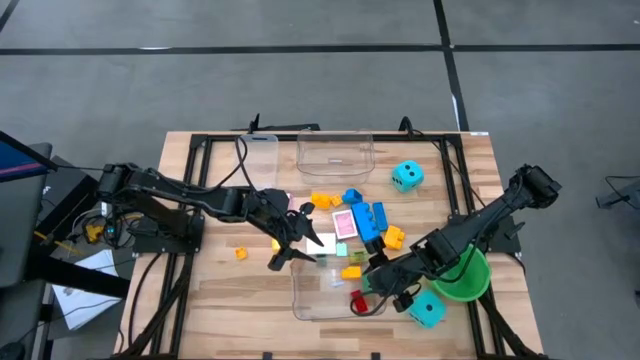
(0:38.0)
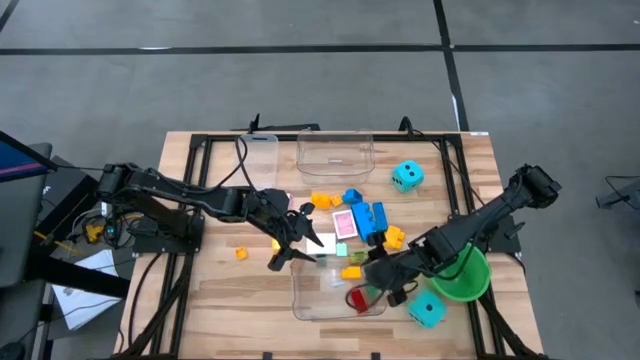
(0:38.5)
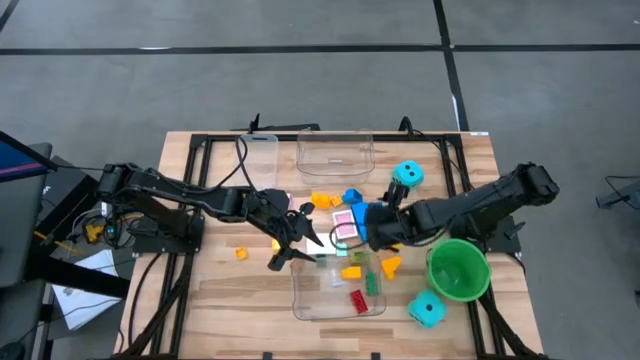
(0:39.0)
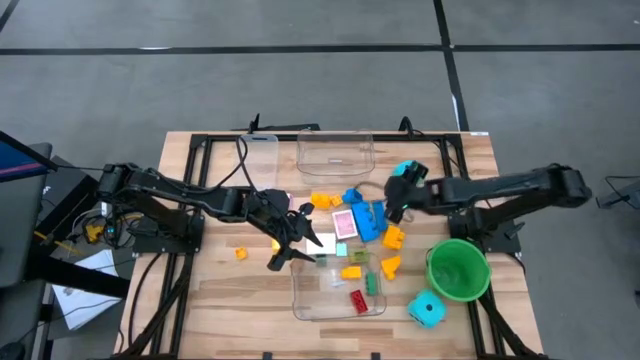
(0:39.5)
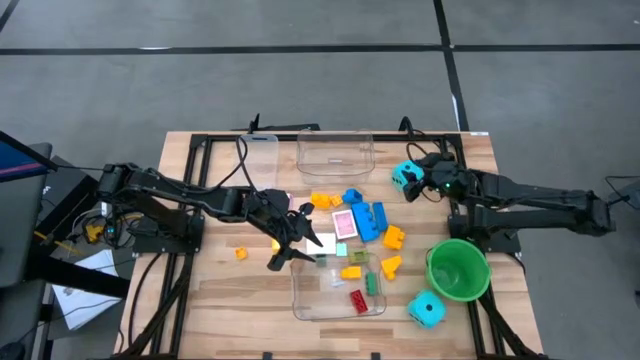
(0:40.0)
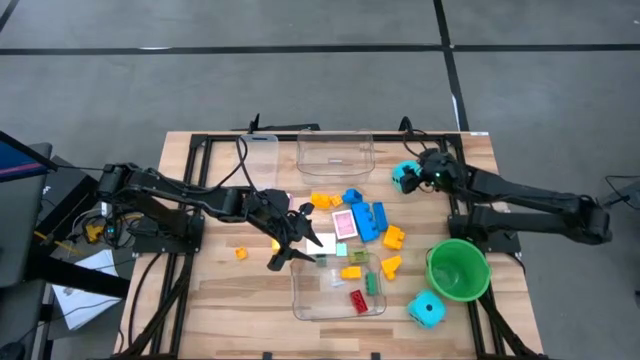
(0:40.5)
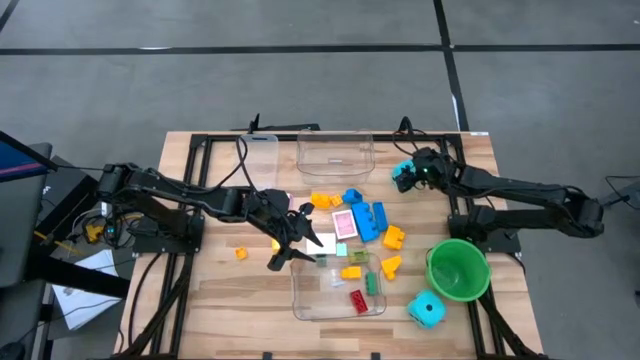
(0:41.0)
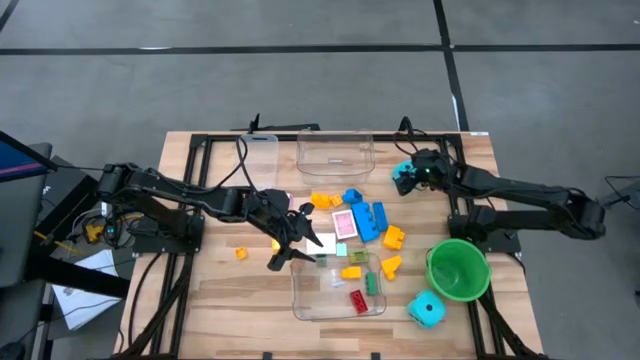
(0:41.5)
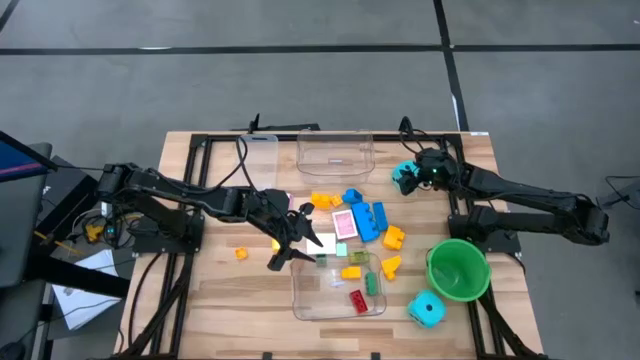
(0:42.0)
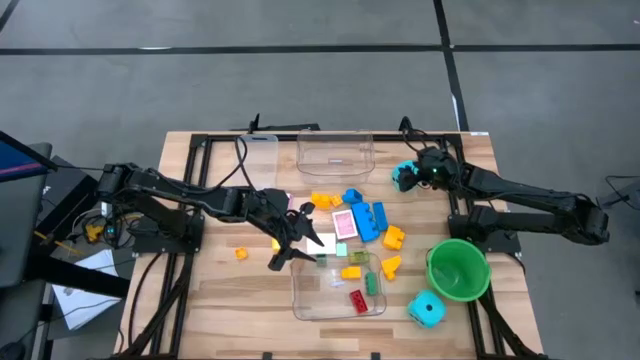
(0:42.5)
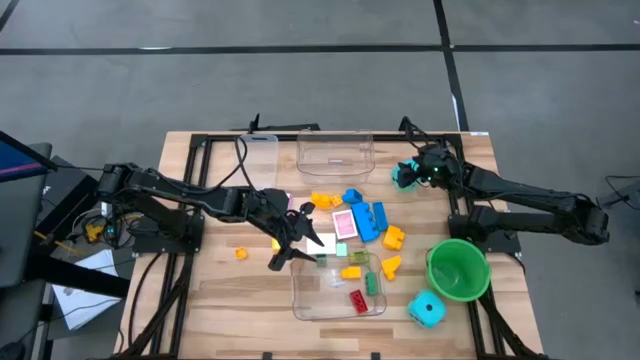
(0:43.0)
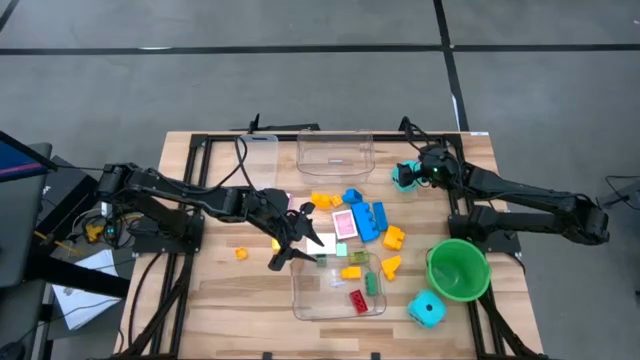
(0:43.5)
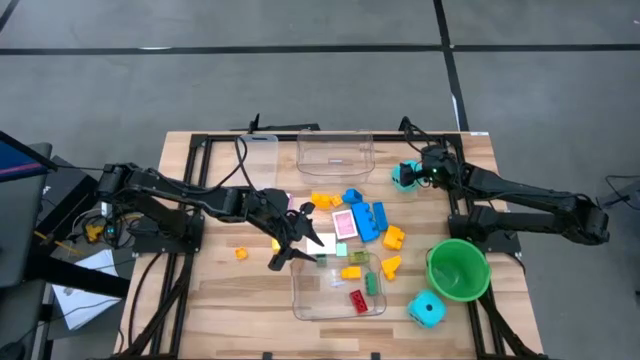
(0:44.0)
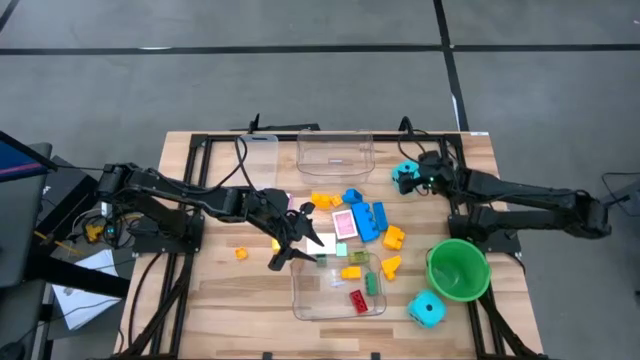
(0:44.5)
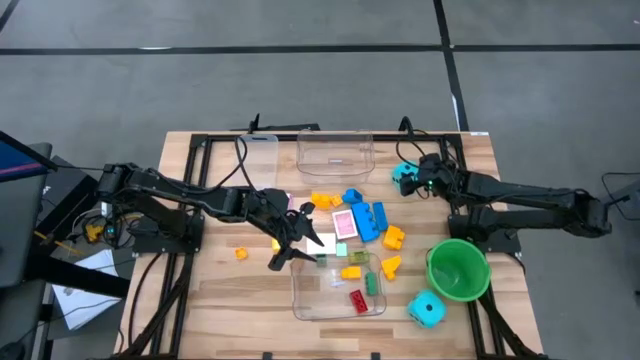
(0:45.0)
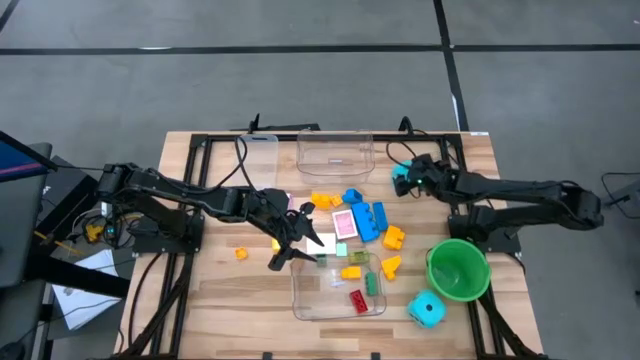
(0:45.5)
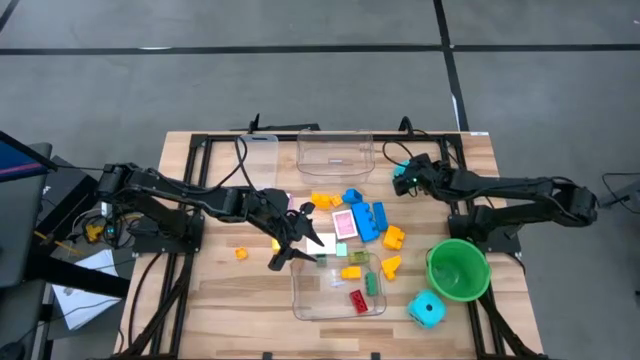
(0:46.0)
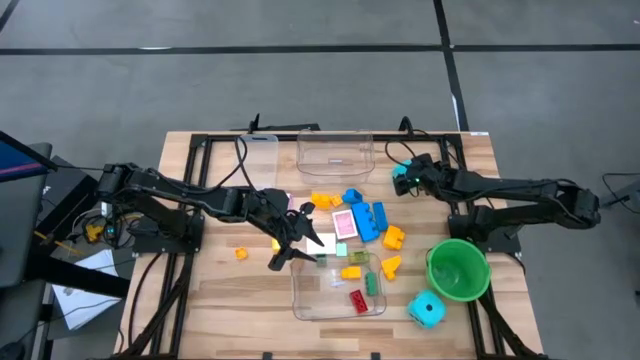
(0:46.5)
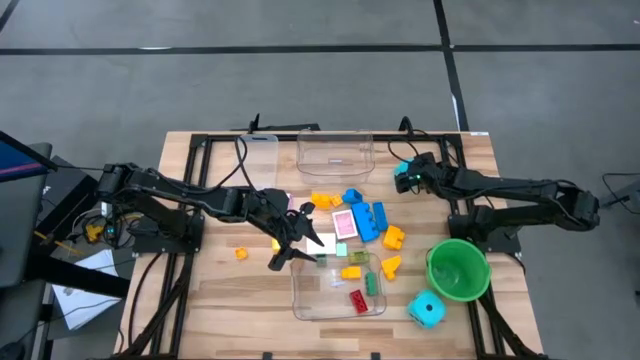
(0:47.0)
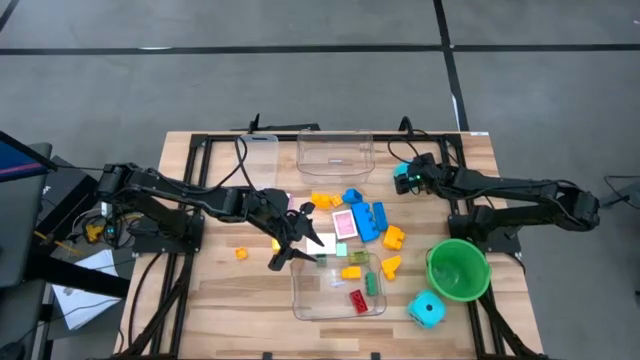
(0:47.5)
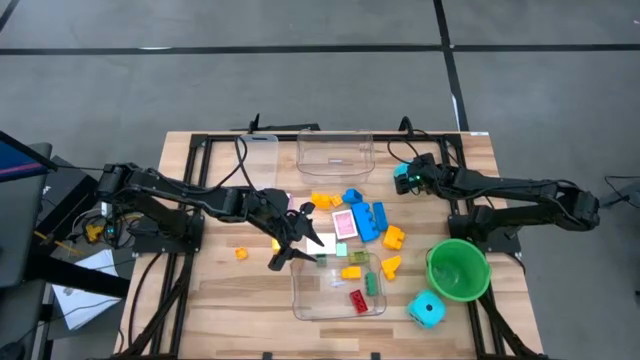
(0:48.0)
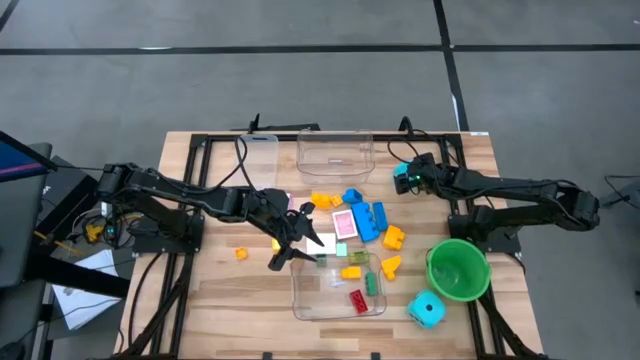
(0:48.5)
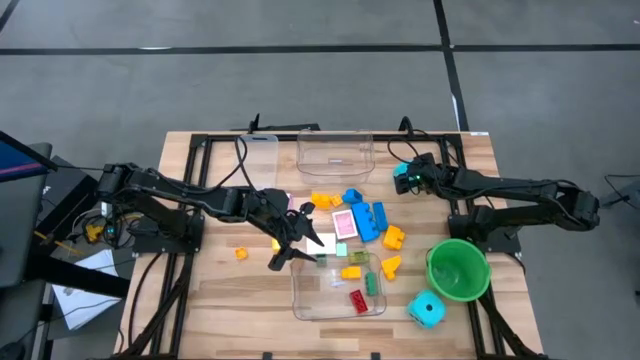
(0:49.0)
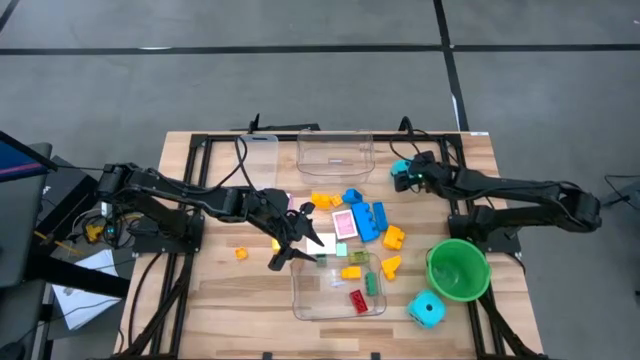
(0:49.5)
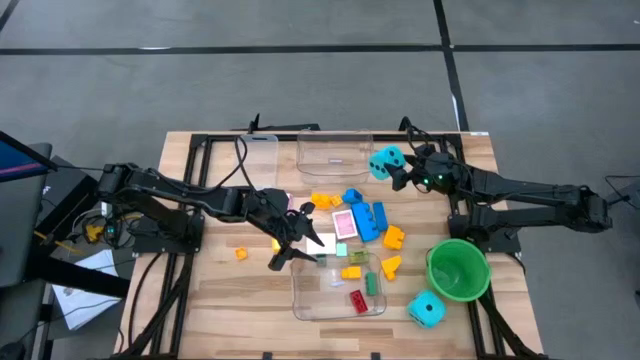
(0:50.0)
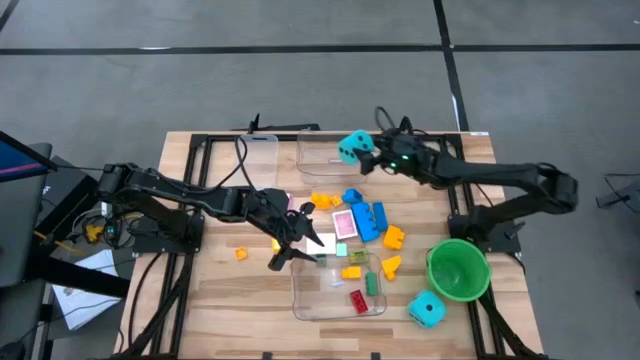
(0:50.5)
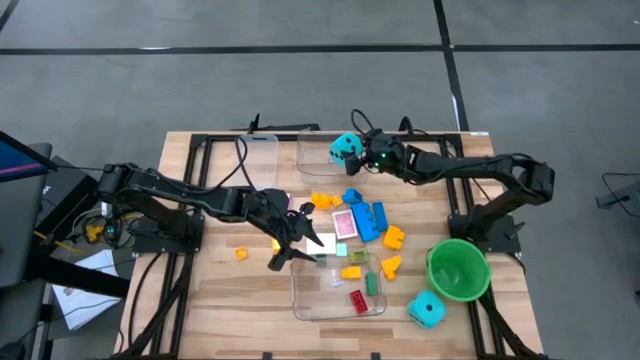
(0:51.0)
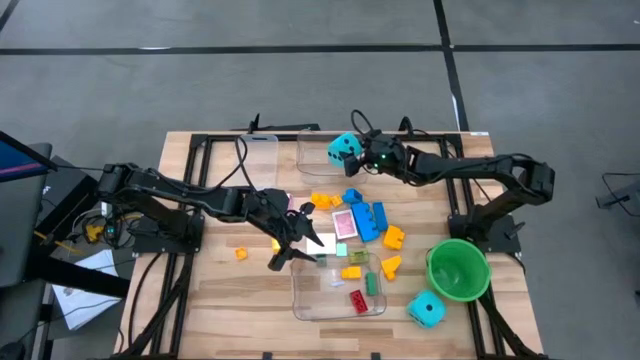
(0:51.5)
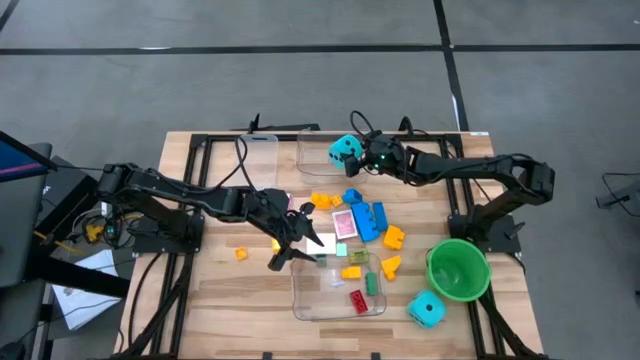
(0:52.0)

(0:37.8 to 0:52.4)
Task: Pick & Place Toys
Put the light blue die into the top transparent bin

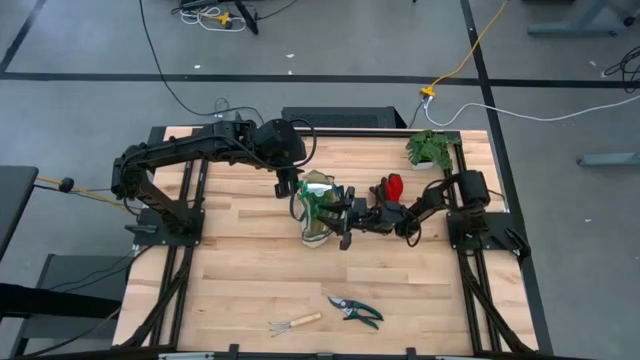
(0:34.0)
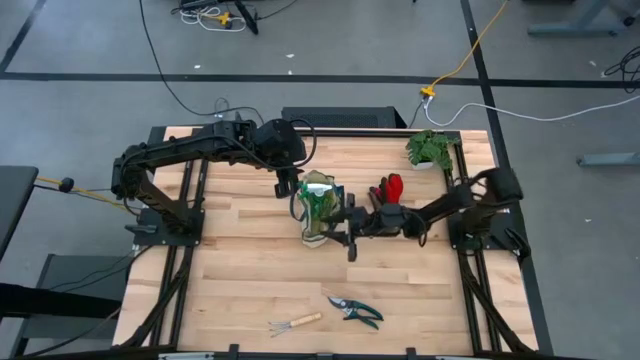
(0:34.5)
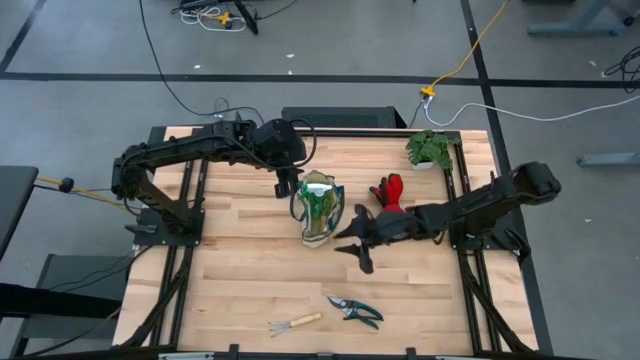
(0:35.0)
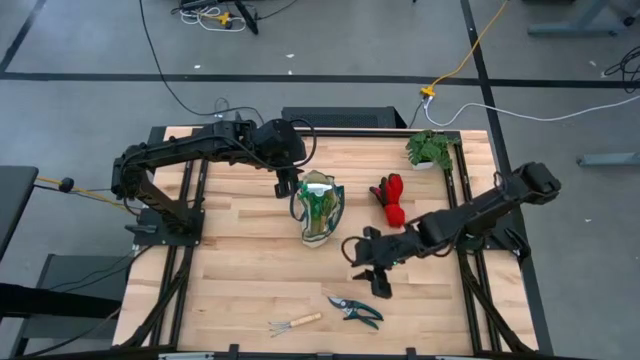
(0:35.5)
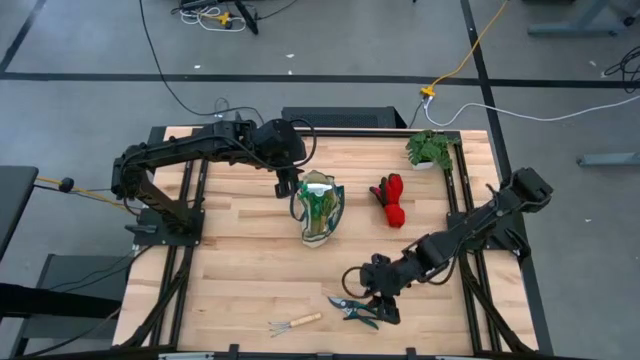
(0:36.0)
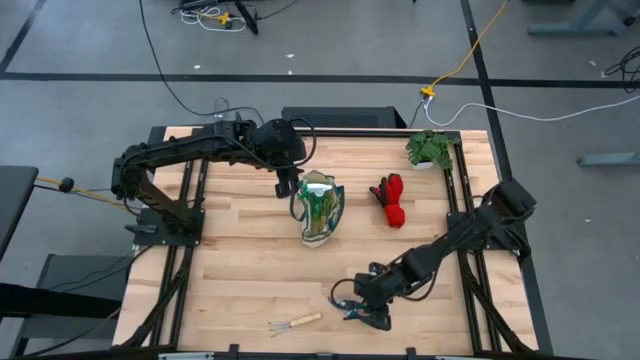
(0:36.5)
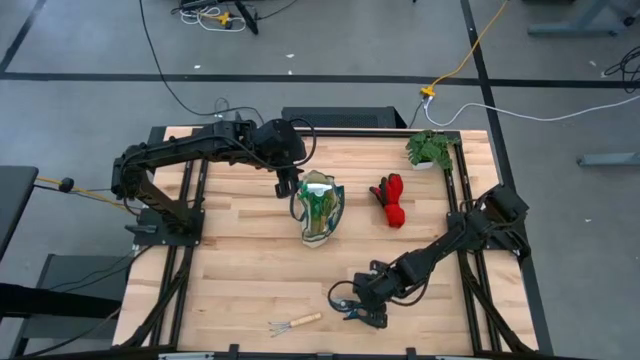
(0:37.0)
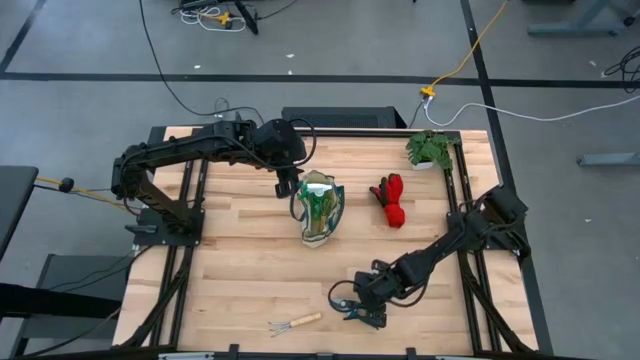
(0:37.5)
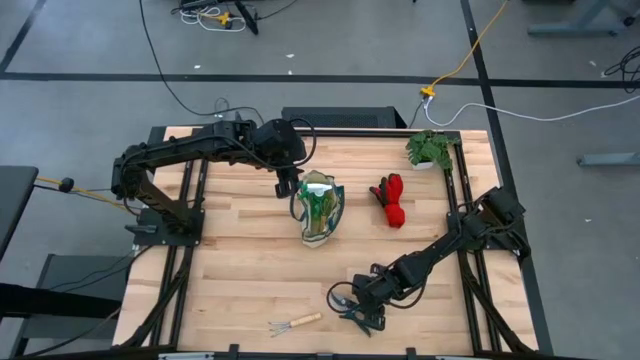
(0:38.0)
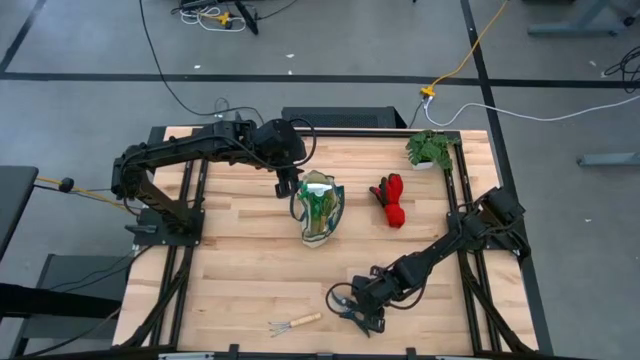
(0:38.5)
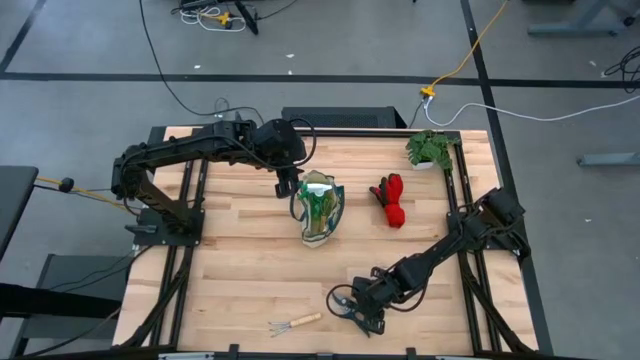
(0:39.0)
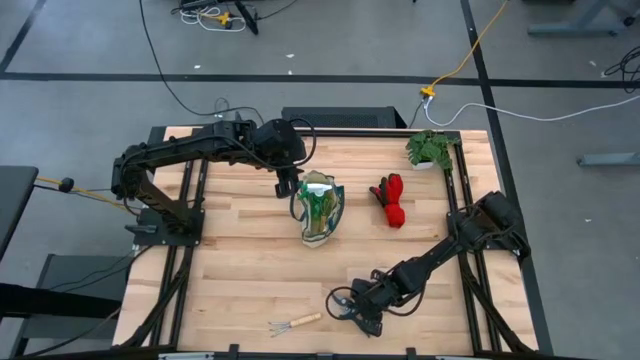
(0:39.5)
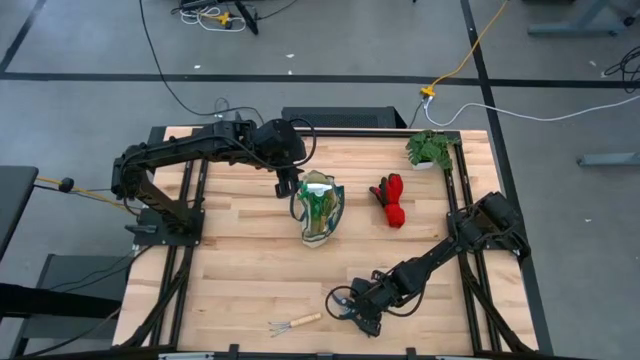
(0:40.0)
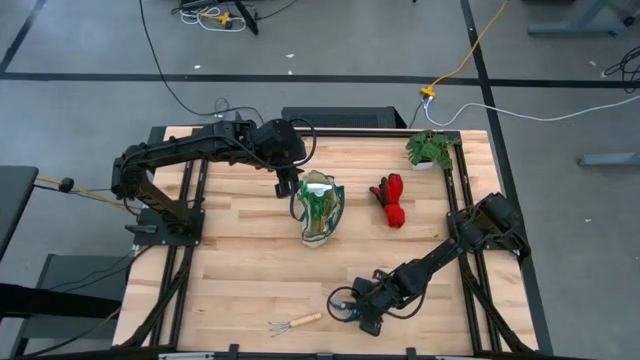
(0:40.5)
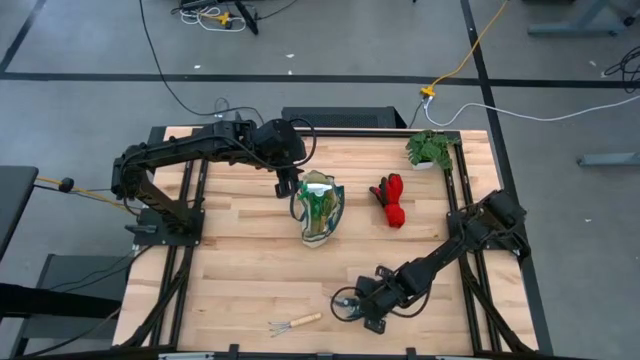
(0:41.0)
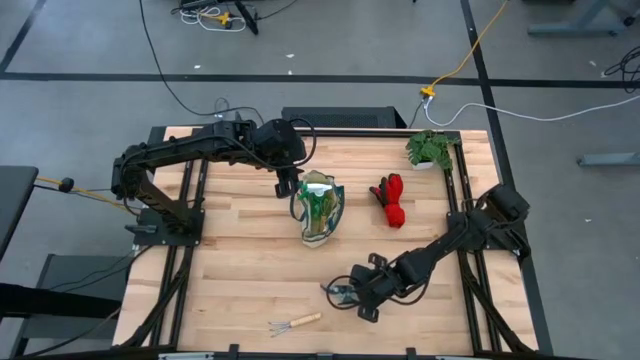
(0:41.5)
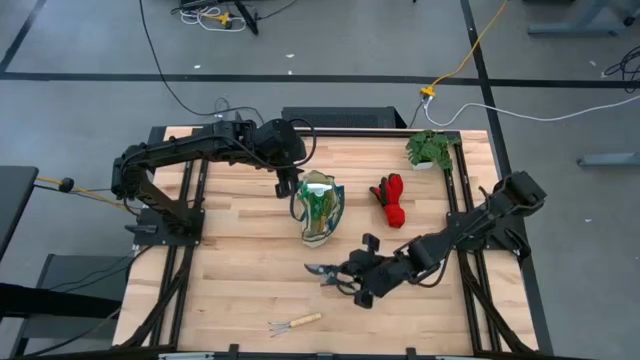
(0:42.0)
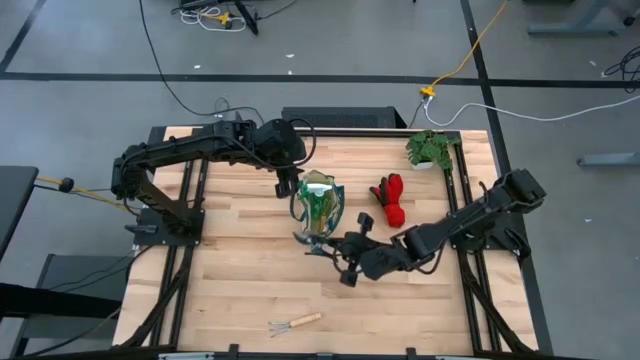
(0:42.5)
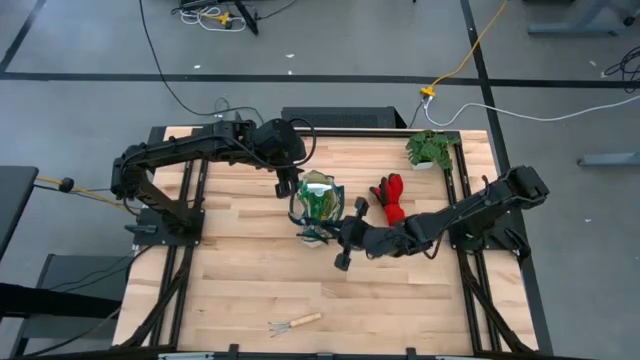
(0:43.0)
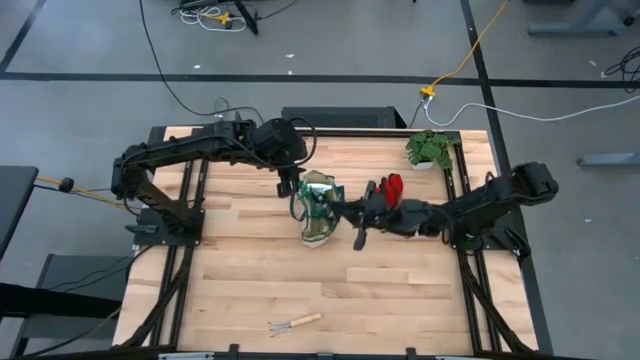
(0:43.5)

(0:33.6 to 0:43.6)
Task: Pick & Place Garden tools in Gardening bag
Put the green shear scissors into the brown gardening bag
